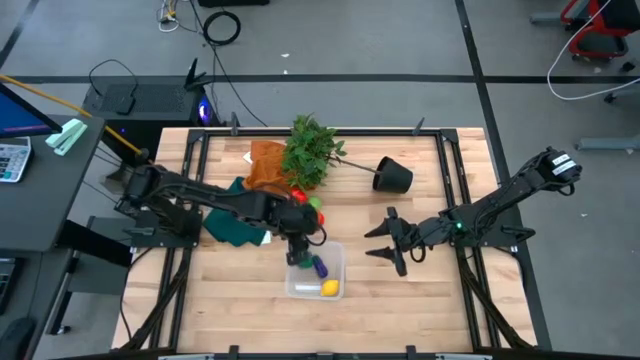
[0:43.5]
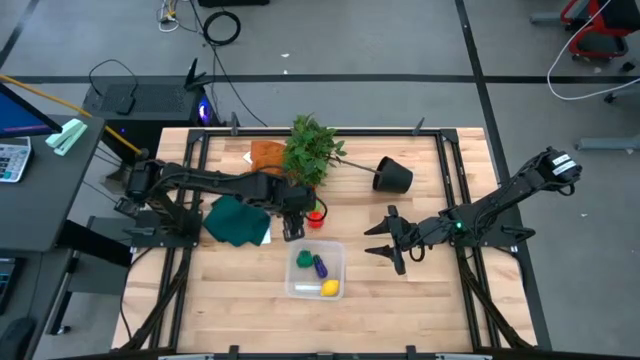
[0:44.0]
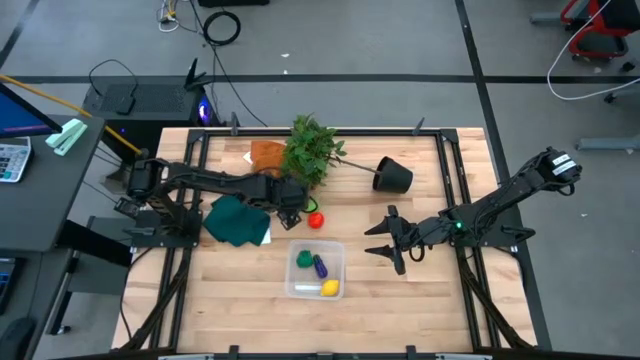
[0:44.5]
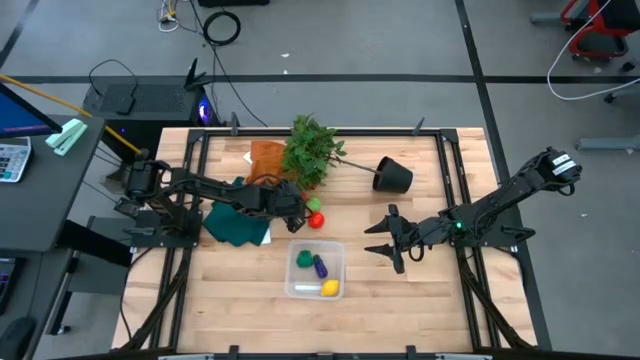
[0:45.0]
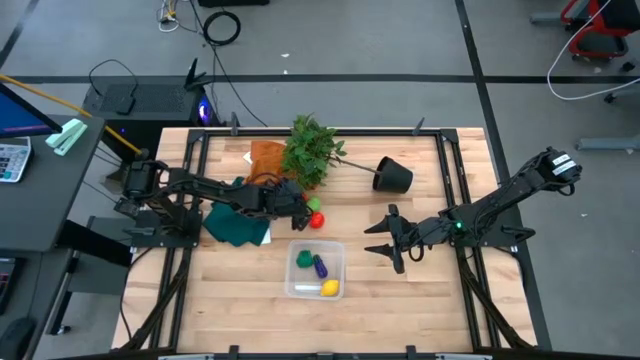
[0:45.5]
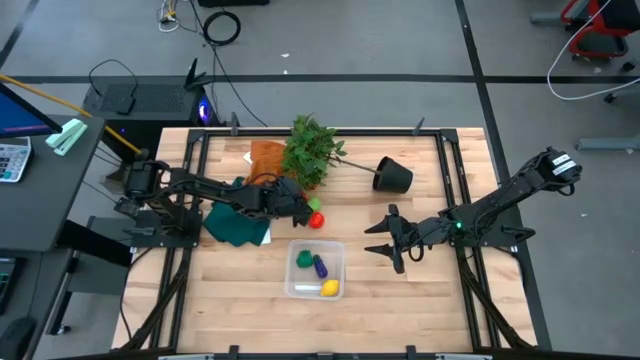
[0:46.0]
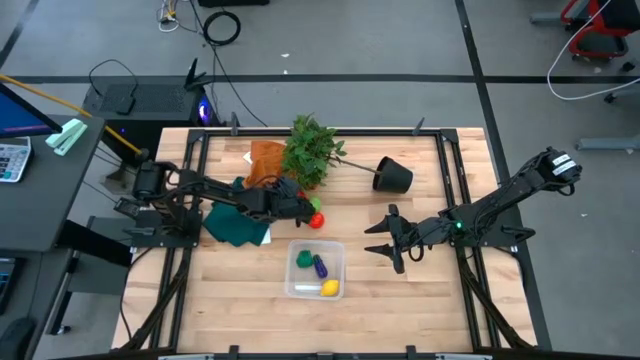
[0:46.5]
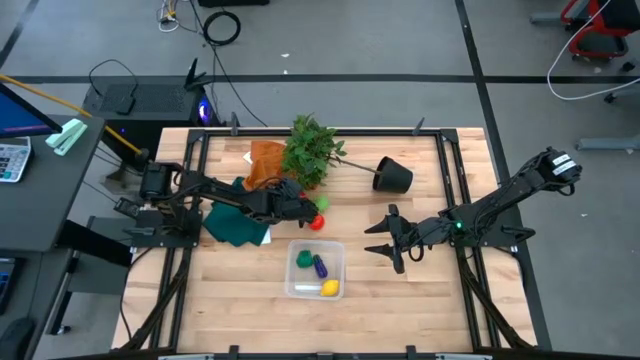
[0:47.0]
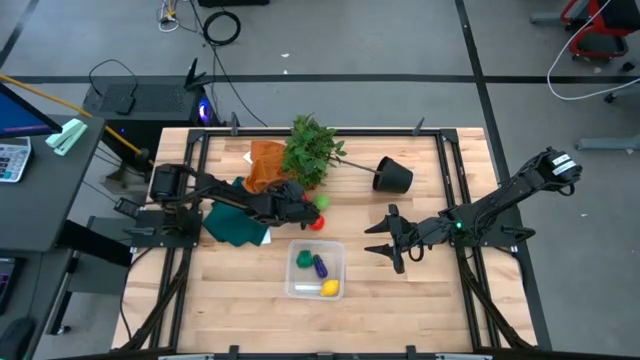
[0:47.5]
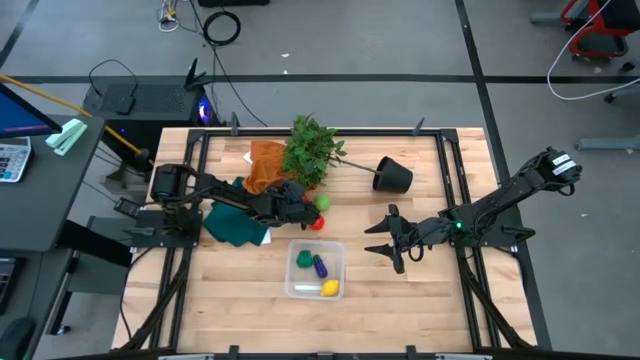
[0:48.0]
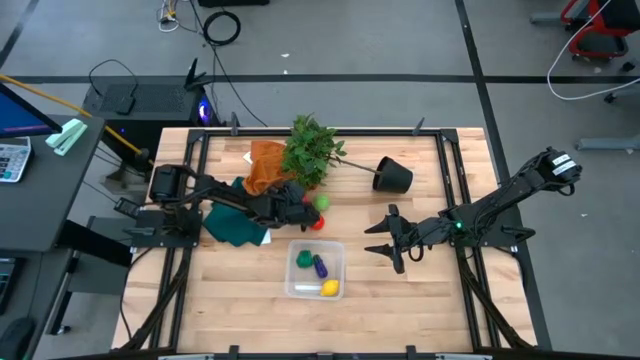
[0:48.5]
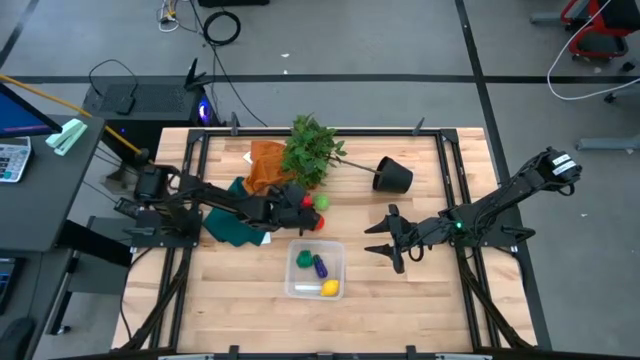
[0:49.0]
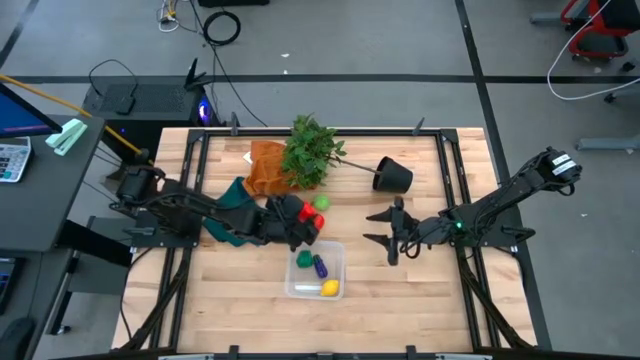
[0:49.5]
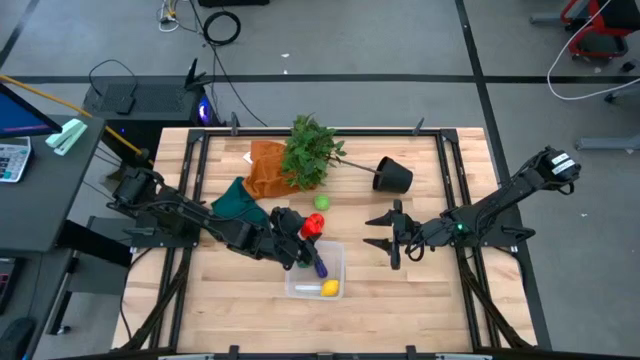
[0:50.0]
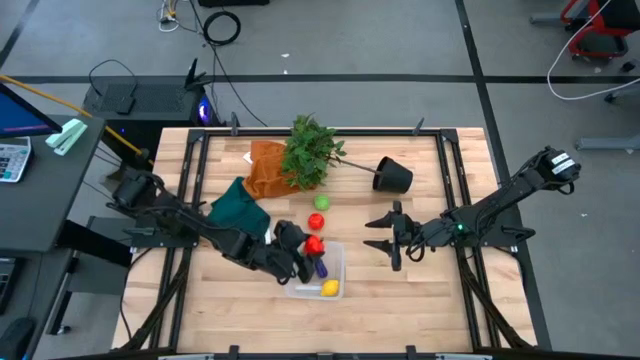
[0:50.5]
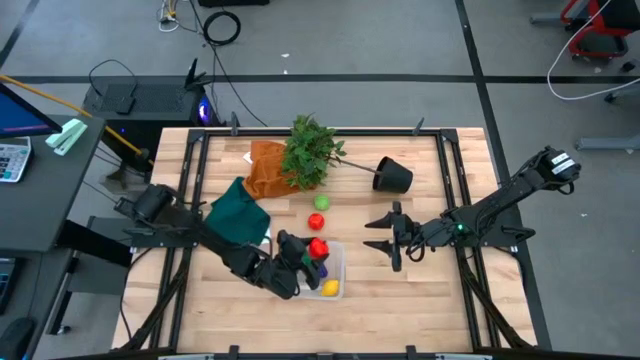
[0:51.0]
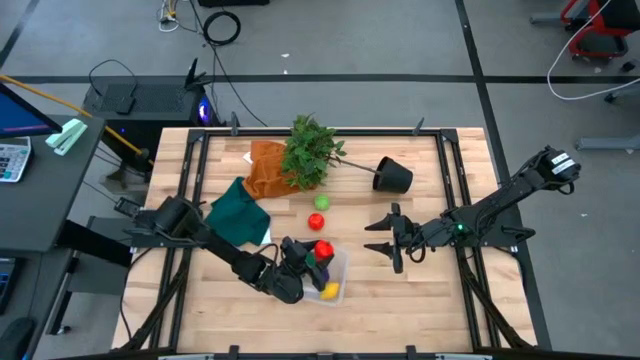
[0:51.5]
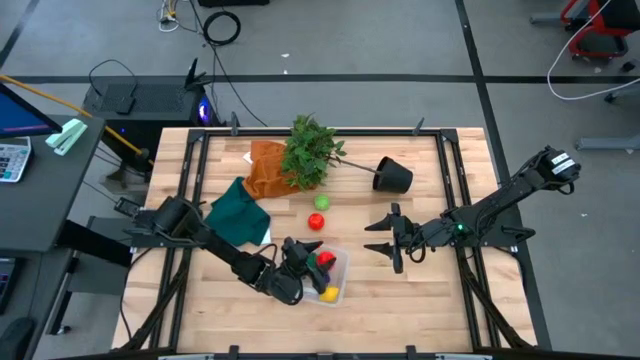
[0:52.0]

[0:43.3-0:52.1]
Task: Pick and placing Produce into tupperware
Put the red apple into the transparent bin

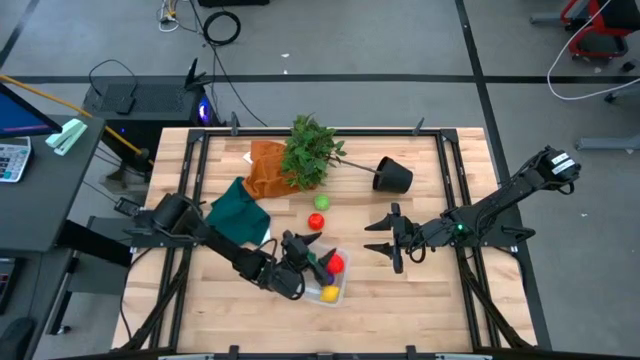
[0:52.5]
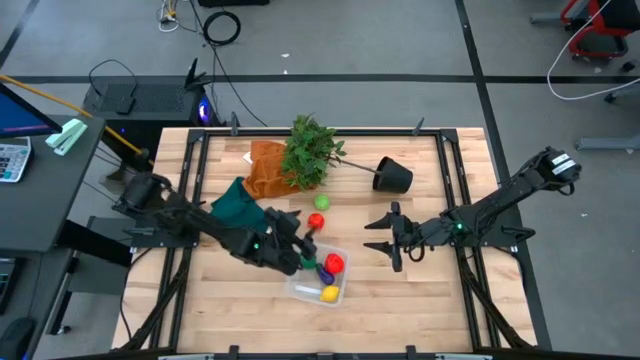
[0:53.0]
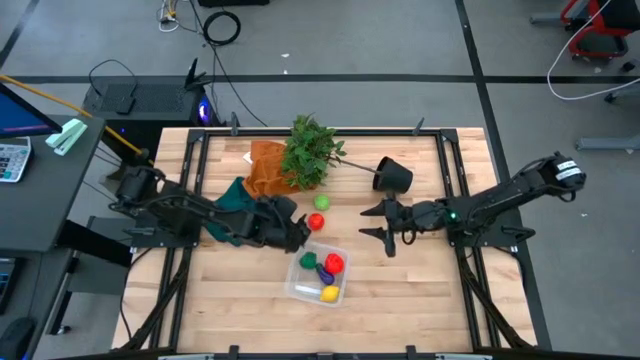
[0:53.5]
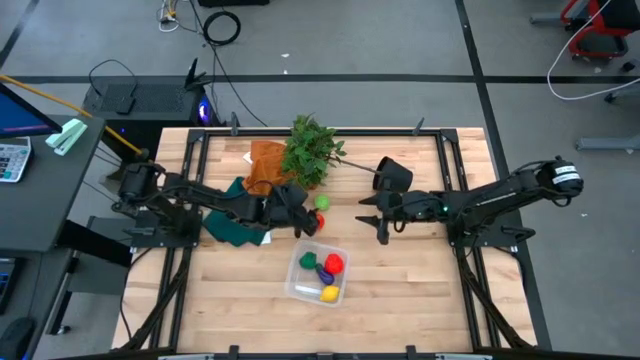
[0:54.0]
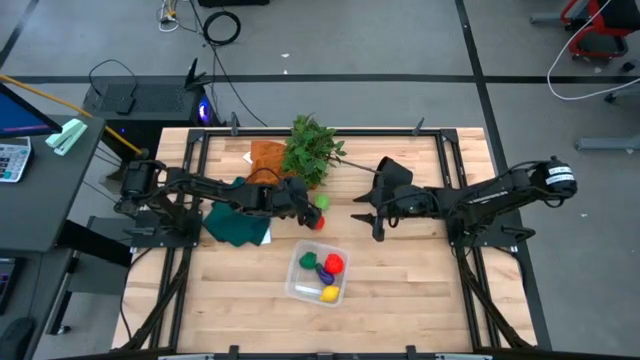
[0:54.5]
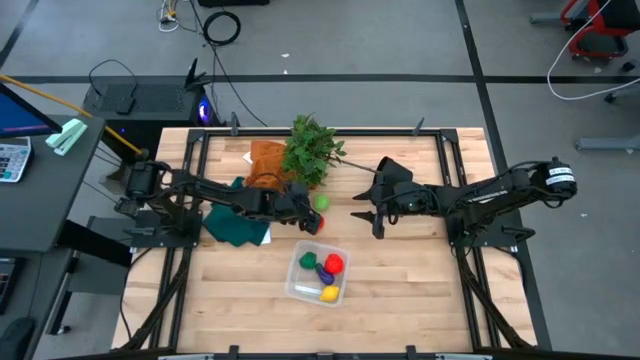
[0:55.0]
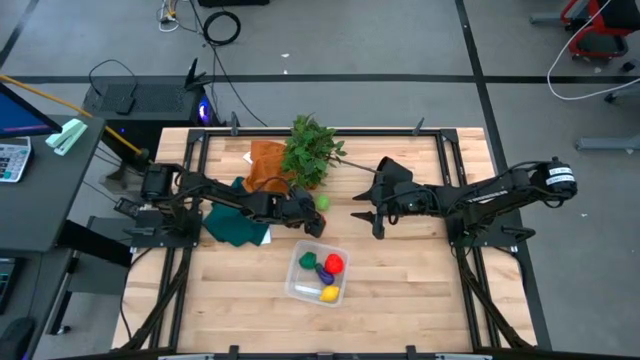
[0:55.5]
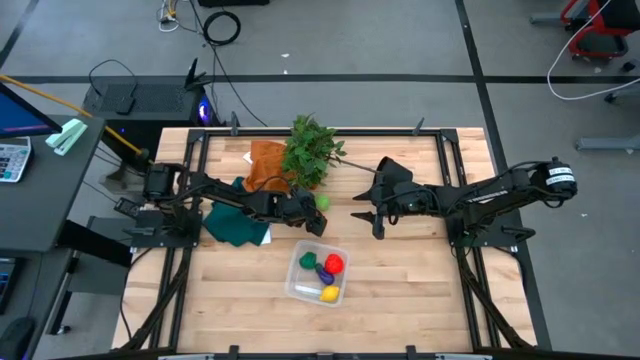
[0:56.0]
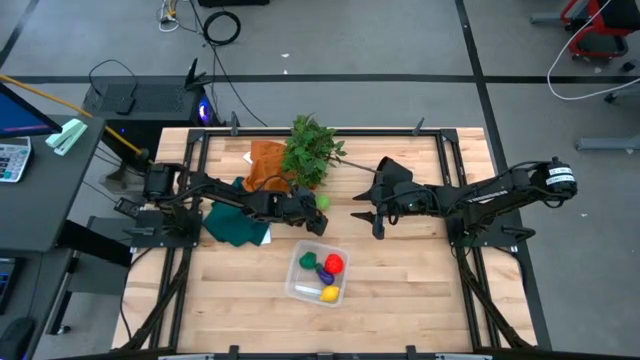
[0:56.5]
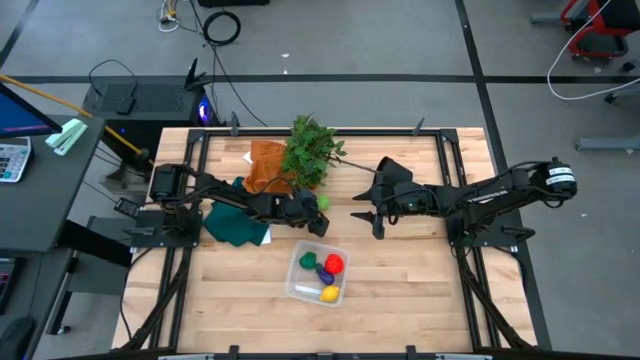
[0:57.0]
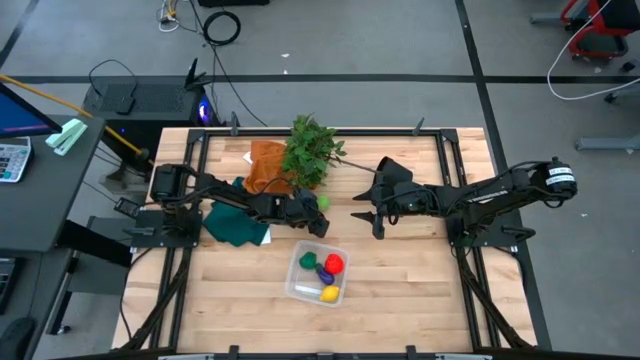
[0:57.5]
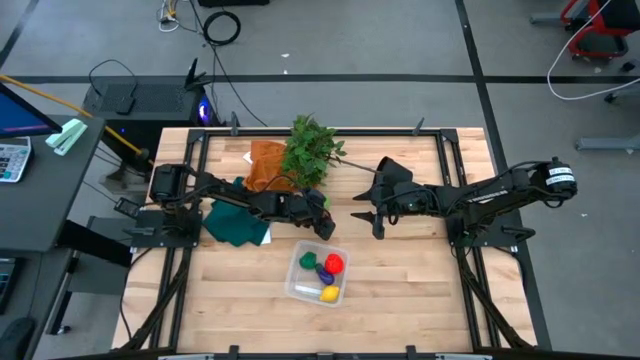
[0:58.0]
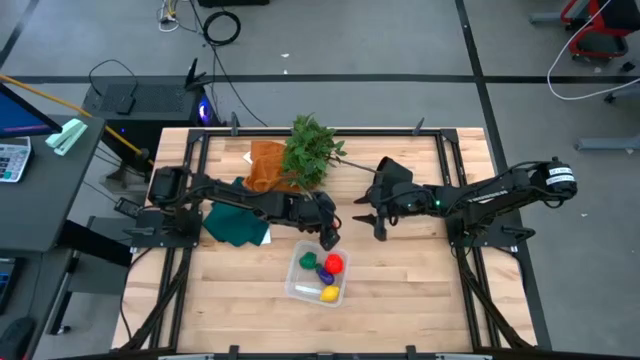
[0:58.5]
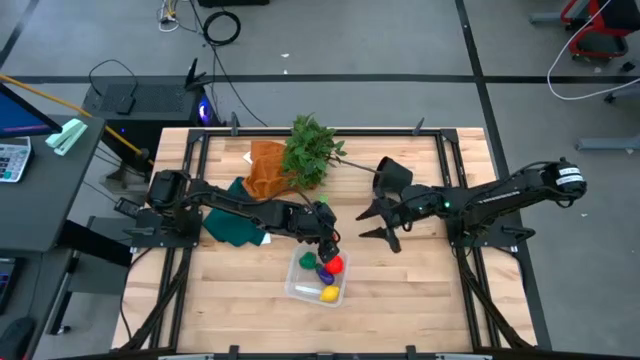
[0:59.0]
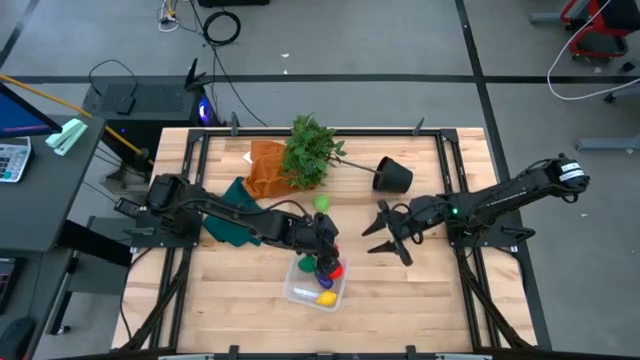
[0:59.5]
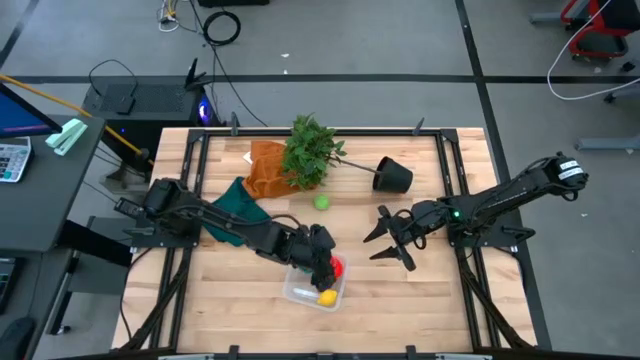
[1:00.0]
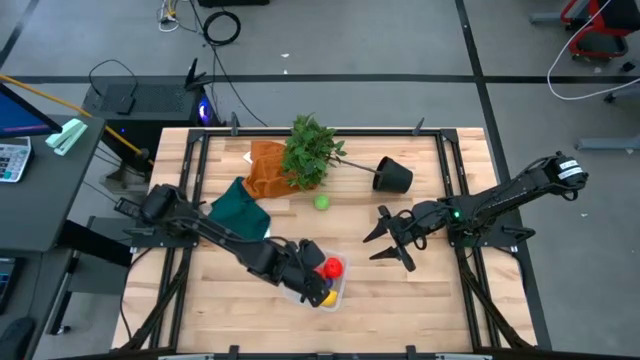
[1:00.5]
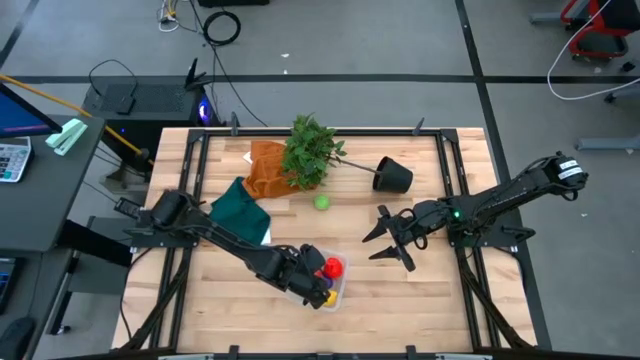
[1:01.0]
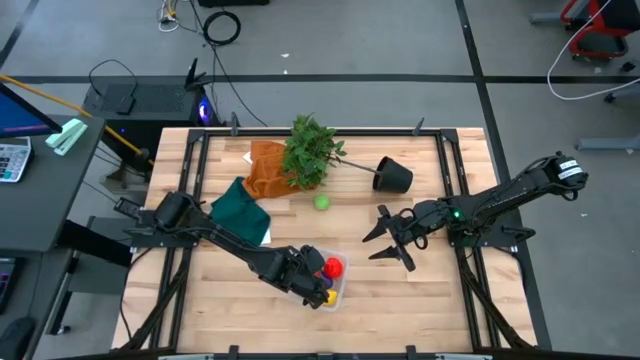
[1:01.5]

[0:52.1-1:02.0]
Put the red tomato into the transparent bin
